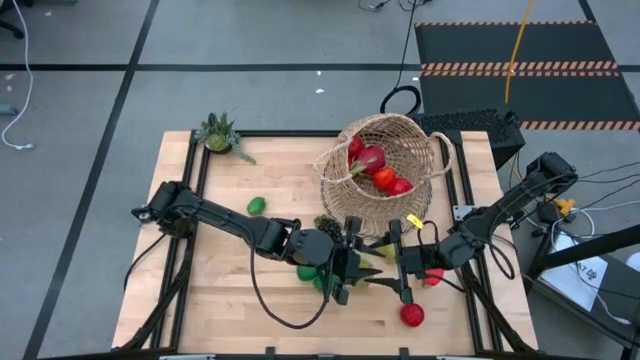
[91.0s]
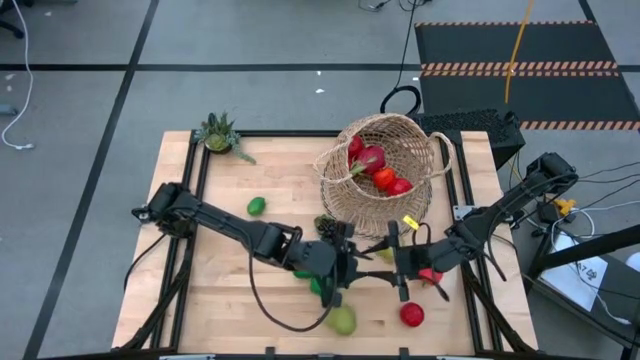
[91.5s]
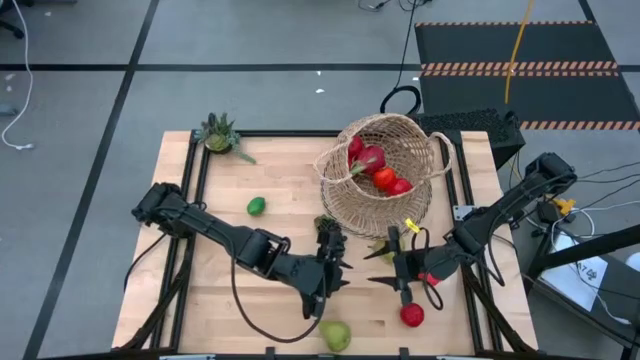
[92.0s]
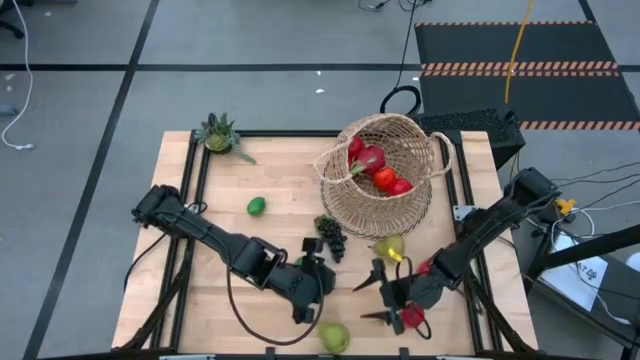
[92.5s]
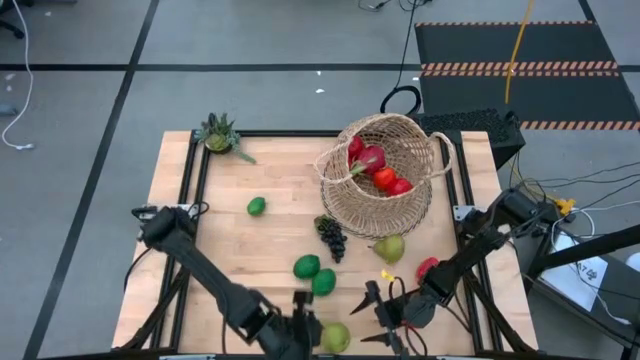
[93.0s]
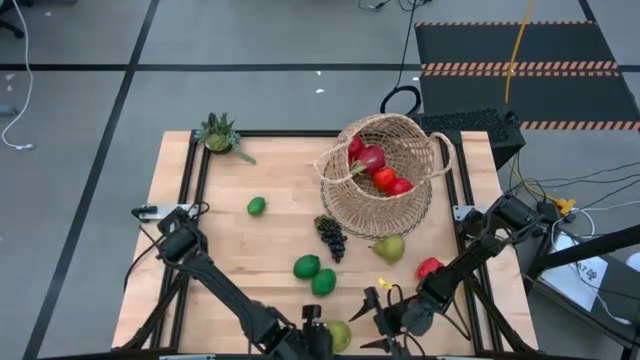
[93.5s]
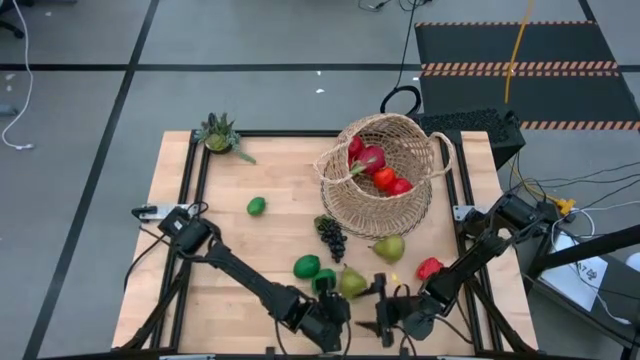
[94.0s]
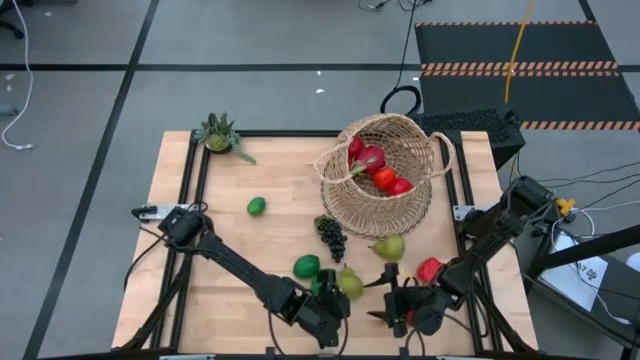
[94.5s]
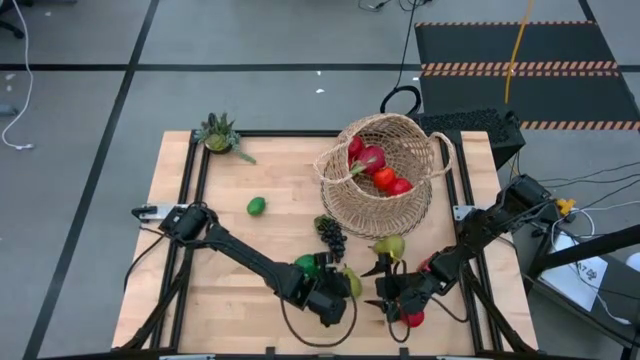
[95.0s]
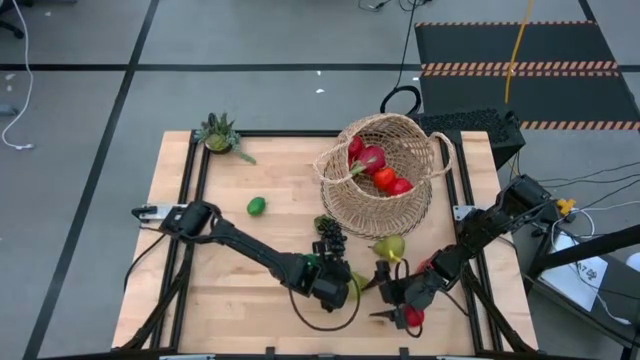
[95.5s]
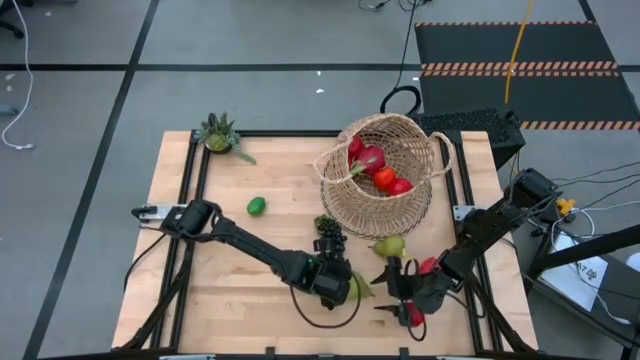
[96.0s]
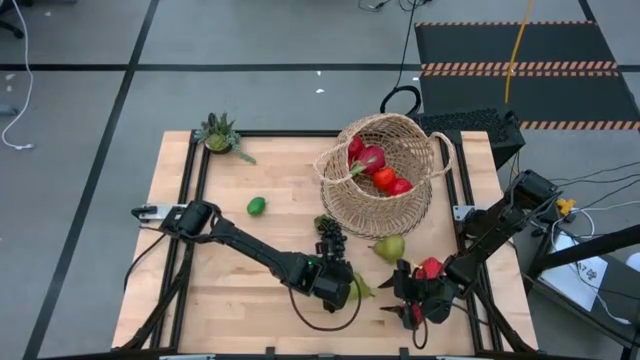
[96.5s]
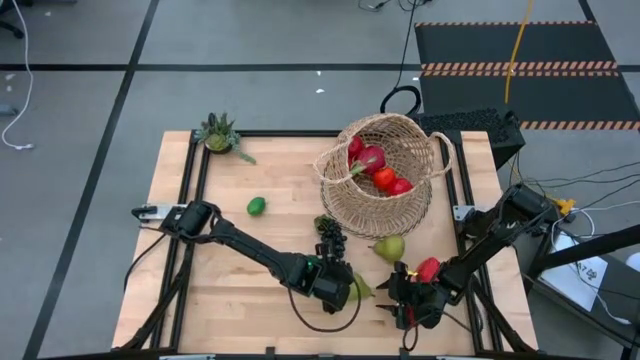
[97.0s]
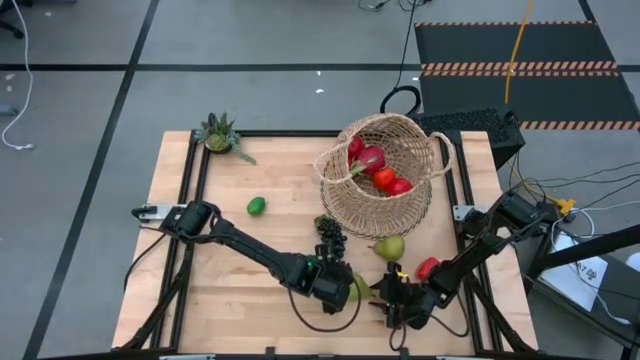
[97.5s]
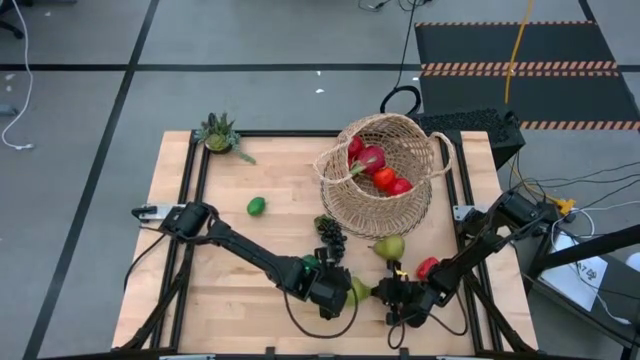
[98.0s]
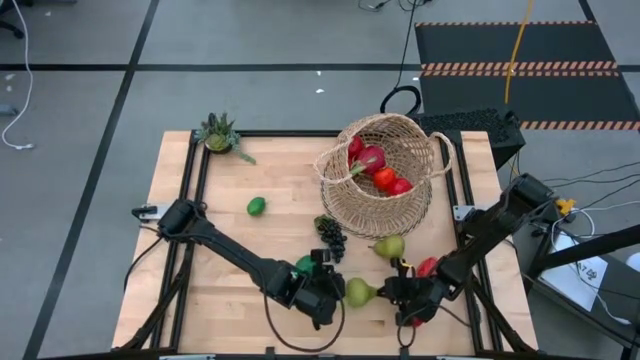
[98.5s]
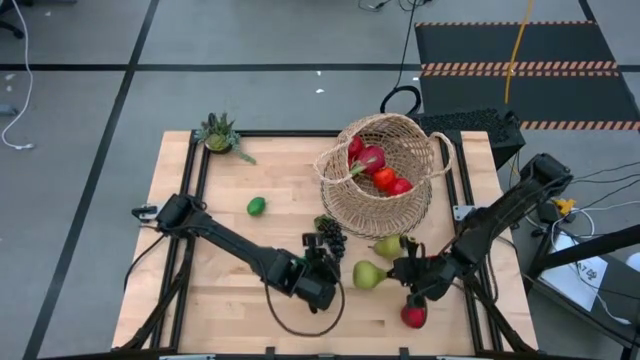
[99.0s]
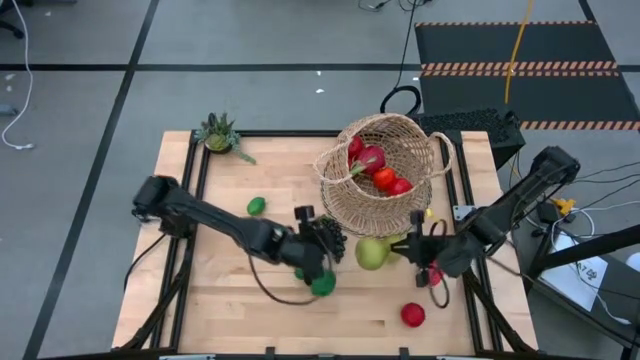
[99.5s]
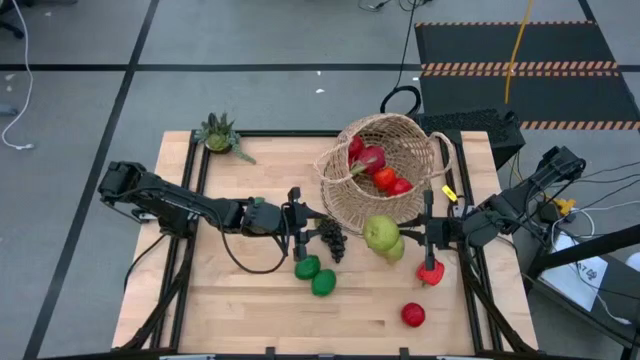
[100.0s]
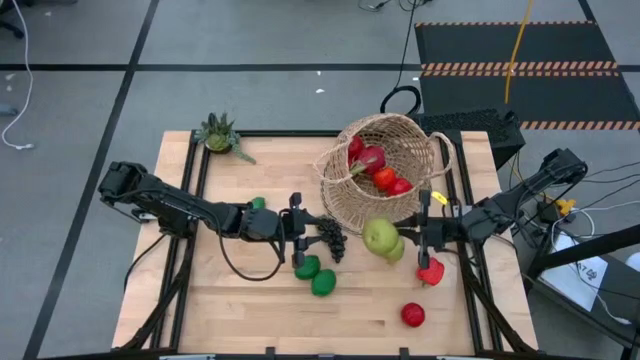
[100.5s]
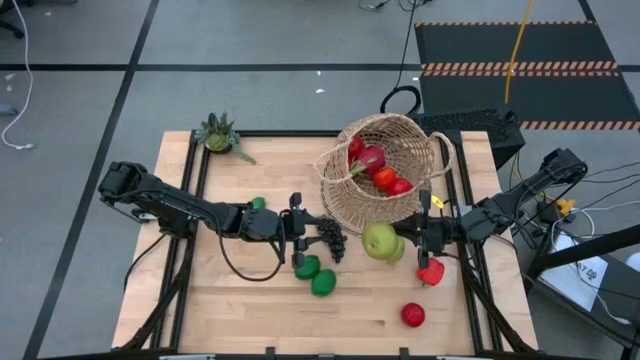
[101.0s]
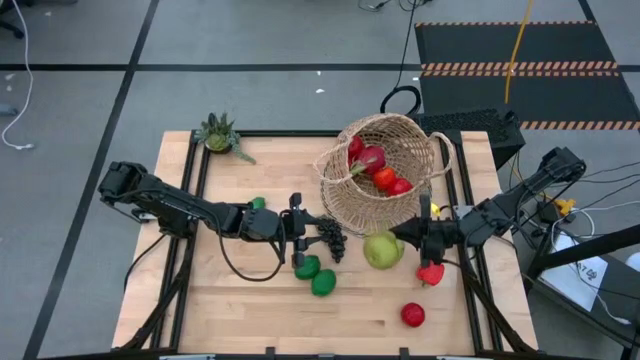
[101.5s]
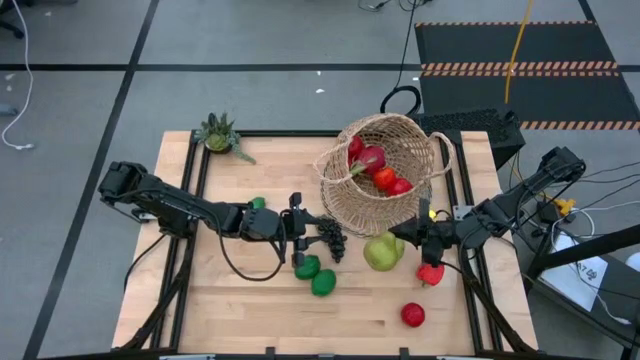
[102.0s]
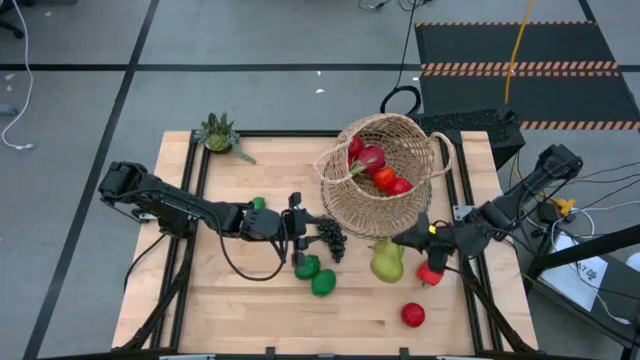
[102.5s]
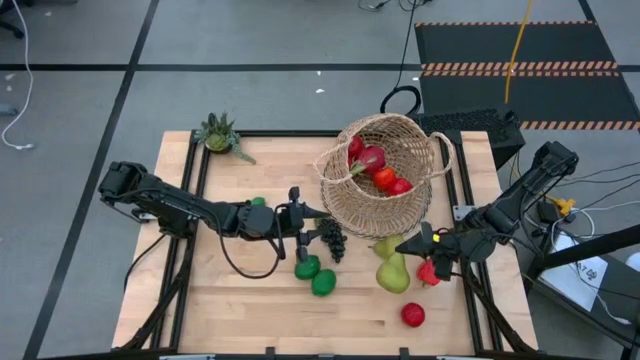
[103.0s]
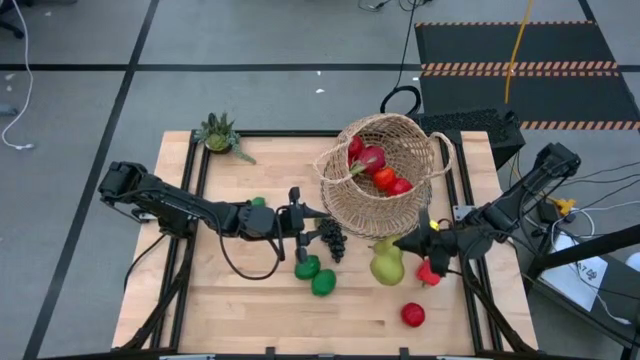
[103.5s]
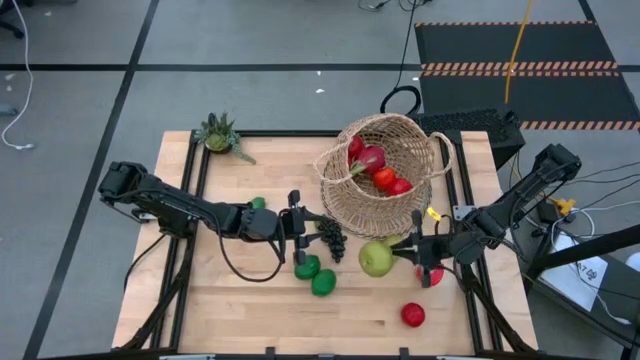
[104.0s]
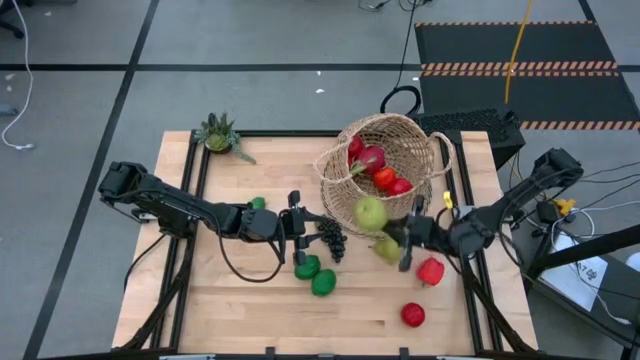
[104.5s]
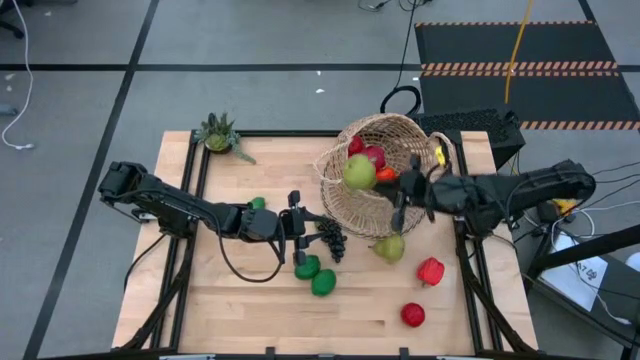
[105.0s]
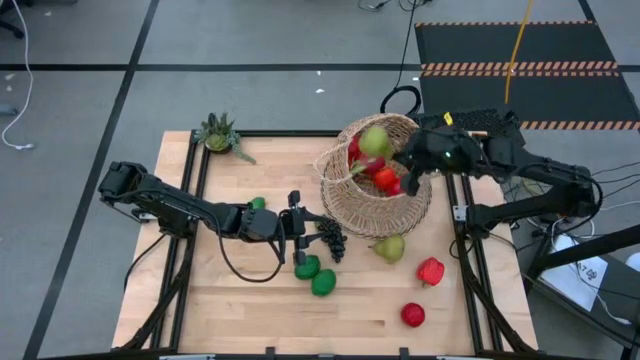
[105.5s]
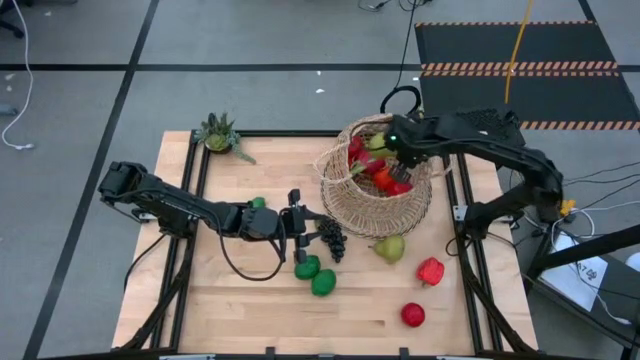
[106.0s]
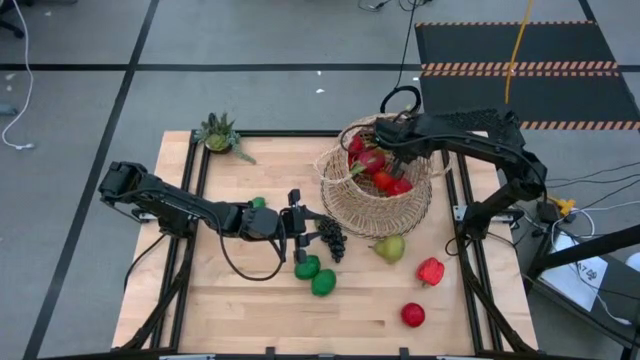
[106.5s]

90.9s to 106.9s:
Task: Build produce basket
Put the green pear into the brown basket

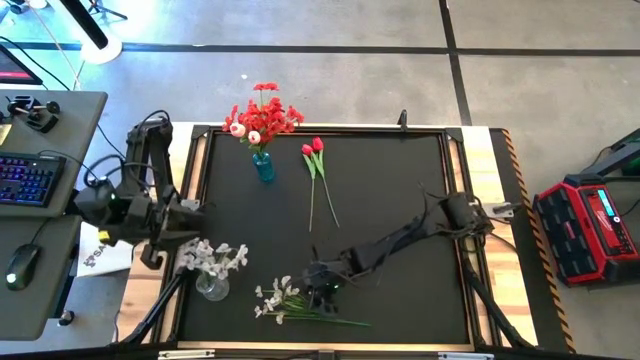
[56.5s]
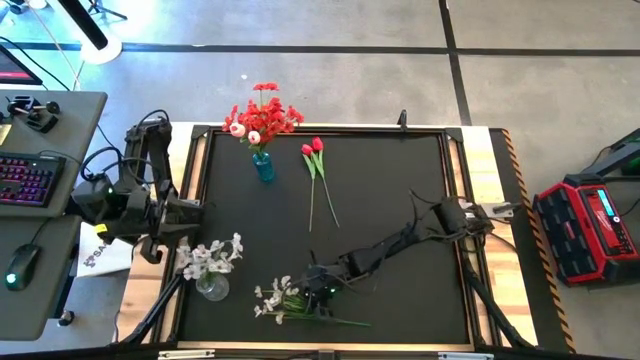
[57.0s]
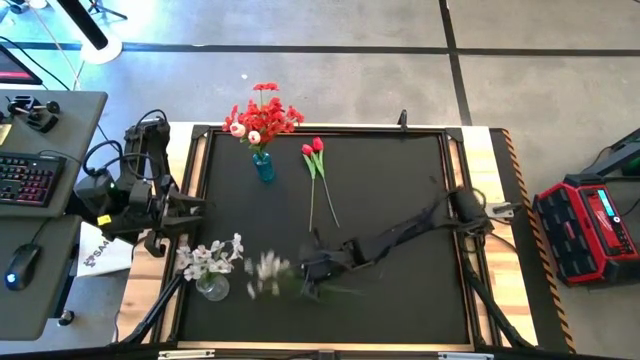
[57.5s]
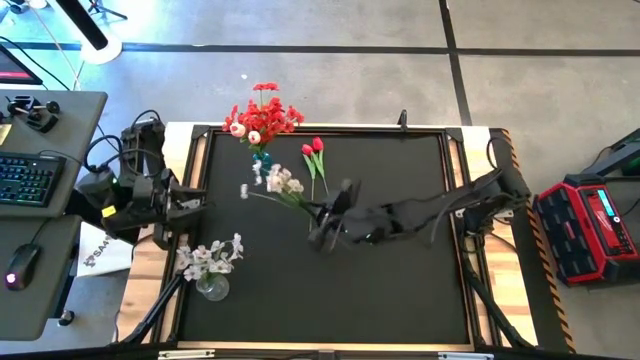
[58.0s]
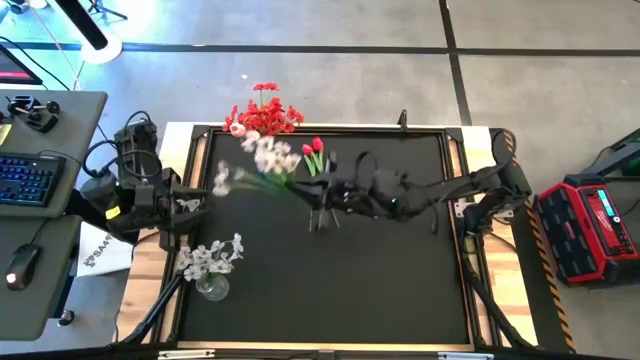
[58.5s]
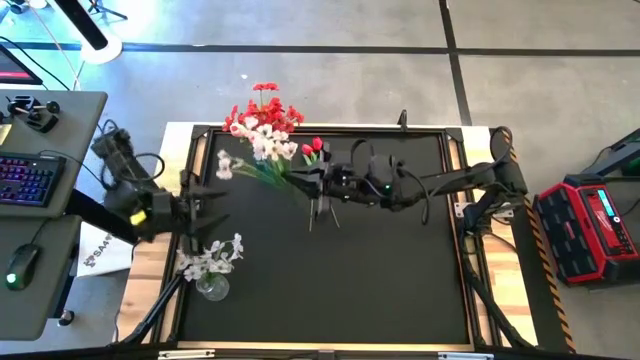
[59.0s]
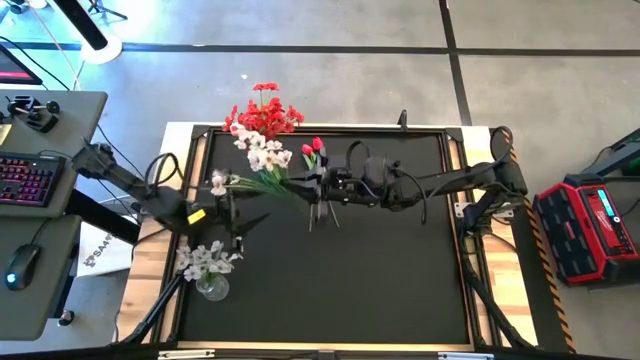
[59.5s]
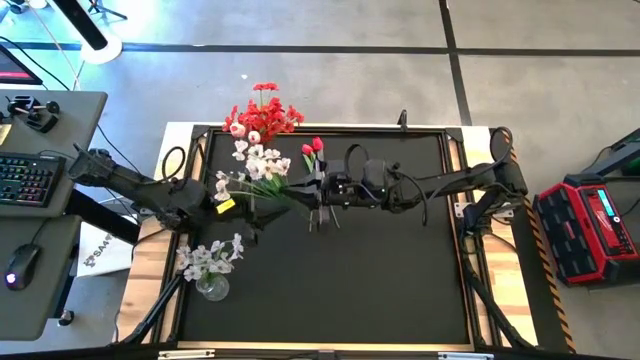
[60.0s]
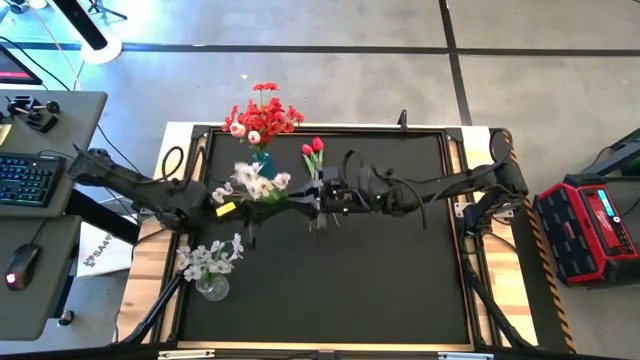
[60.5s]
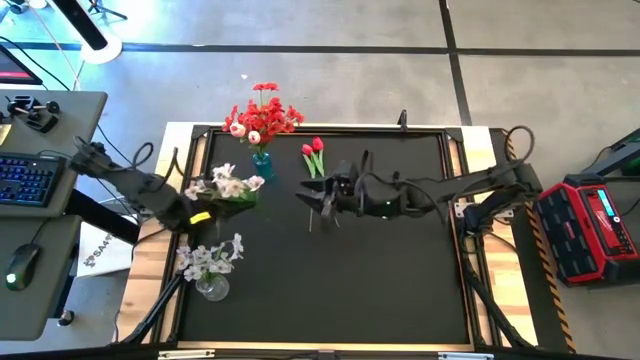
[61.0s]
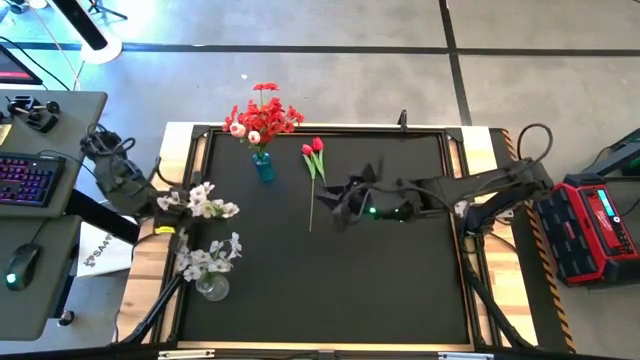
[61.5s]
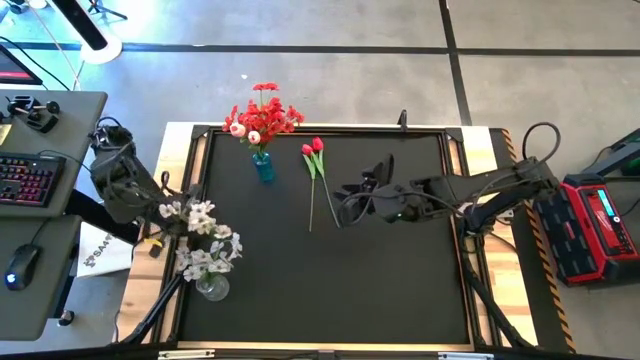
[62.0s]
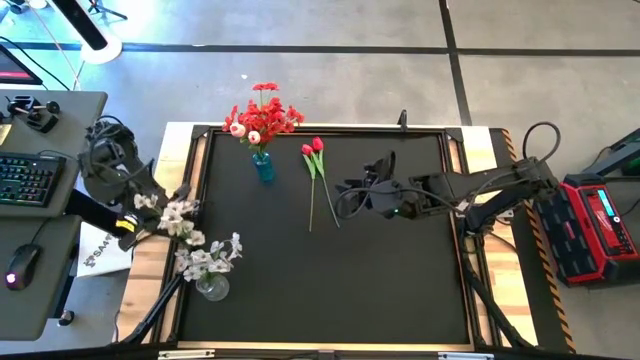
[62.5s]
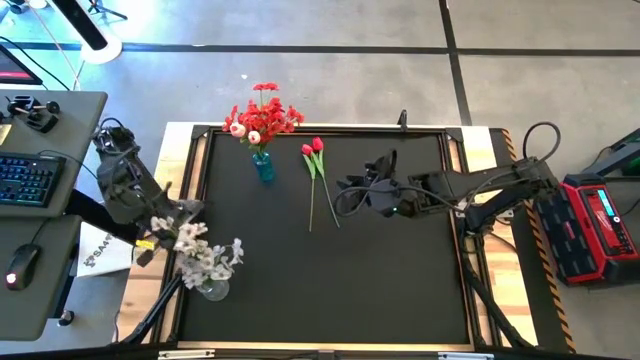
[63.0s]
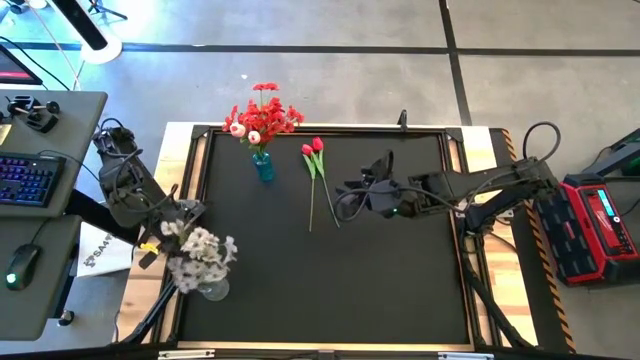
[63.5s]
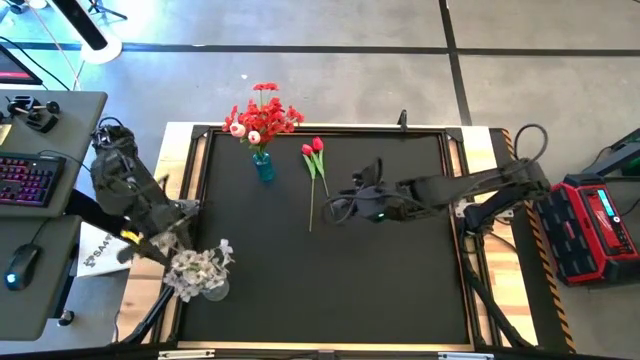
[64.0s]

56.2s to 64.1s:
Task: Sort flowers into vase by color
Put the white flower into the transparent vase
